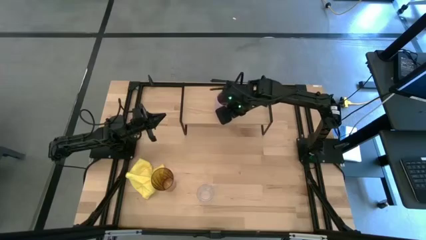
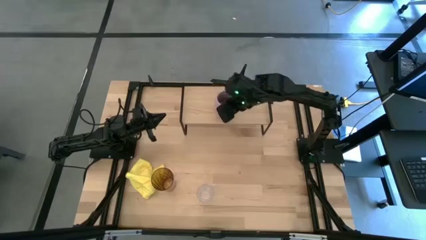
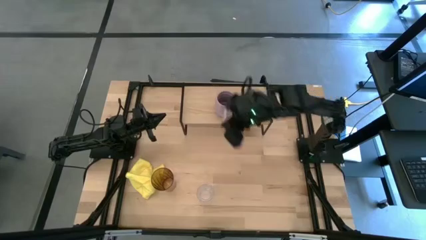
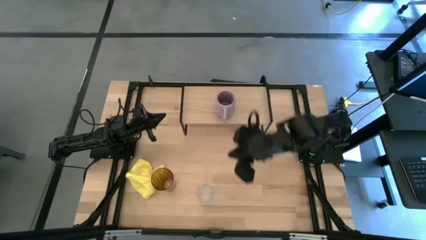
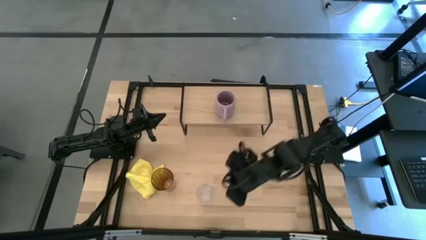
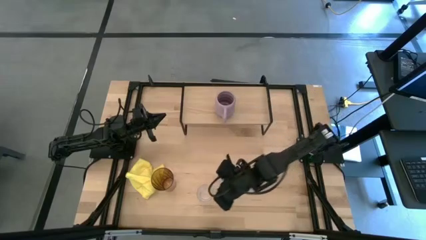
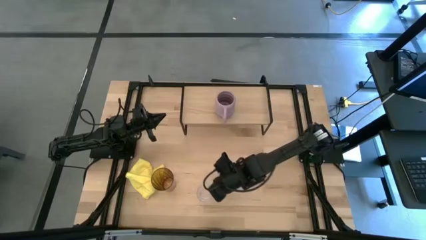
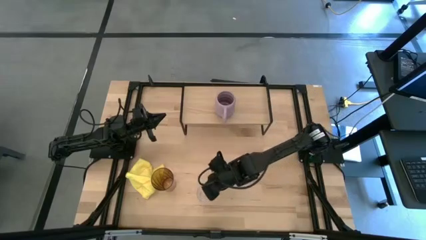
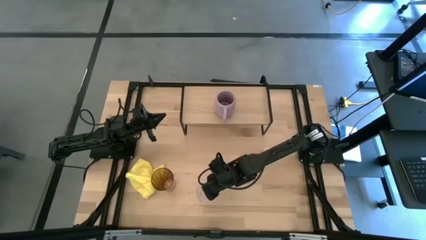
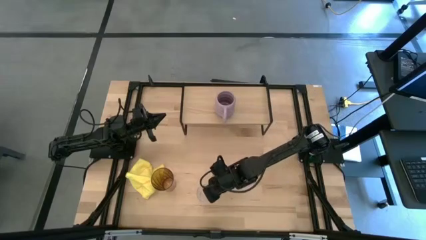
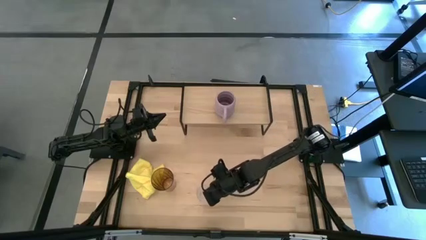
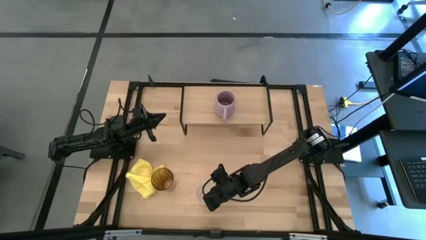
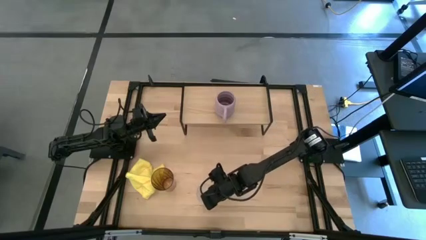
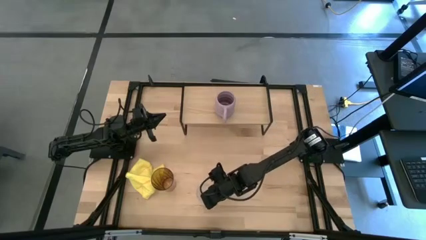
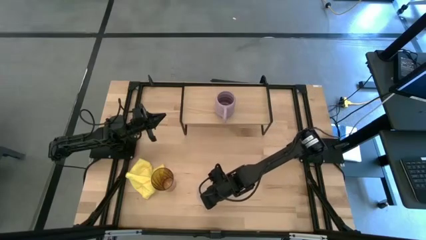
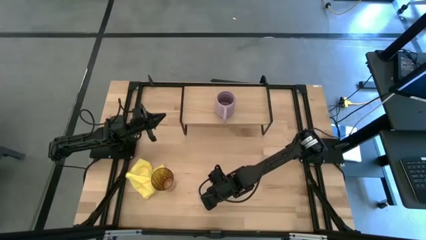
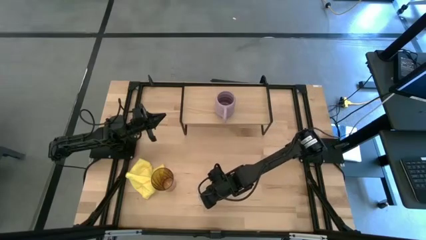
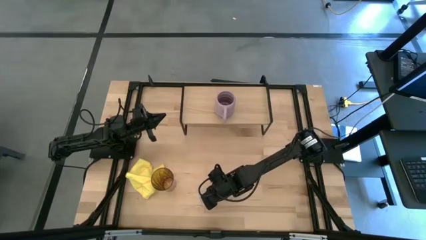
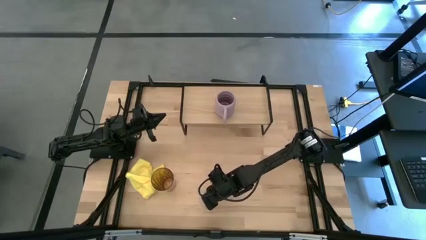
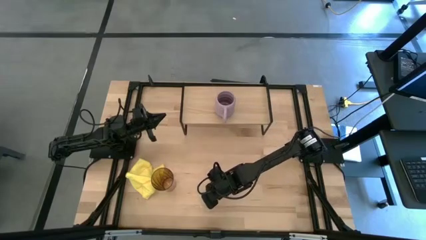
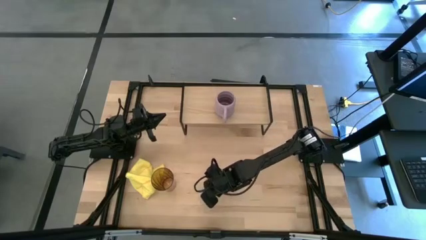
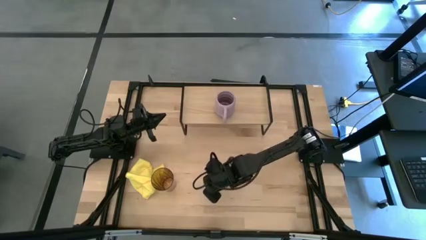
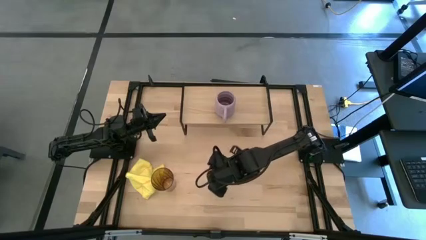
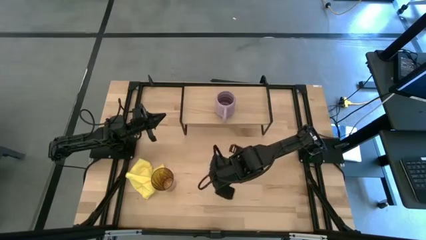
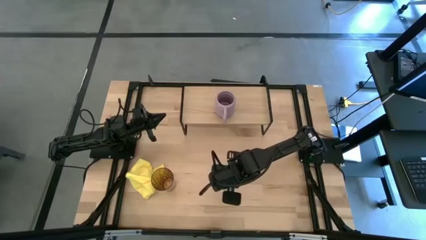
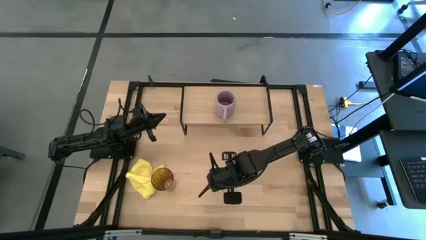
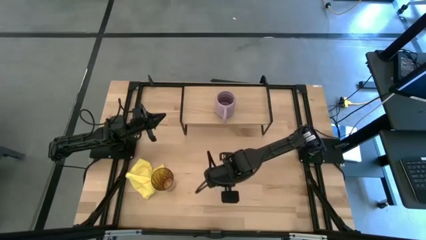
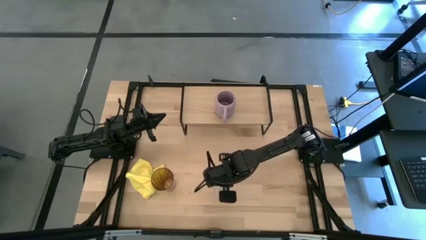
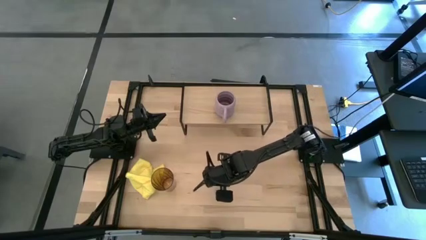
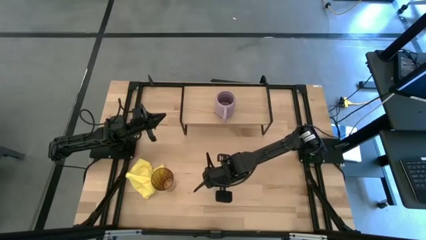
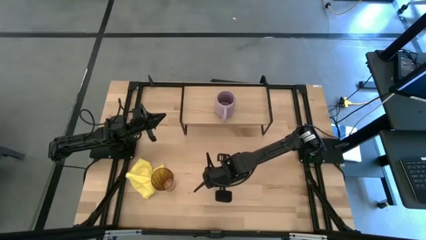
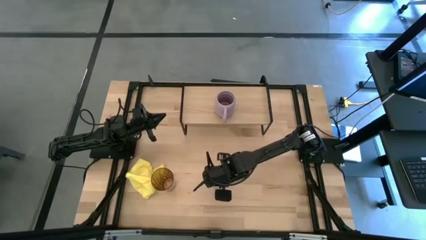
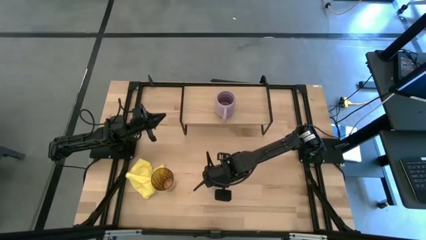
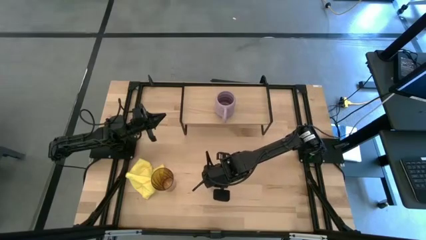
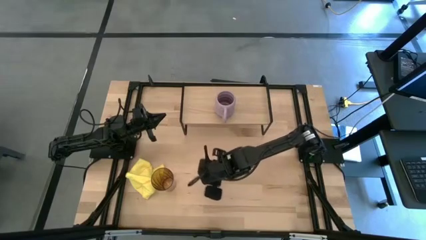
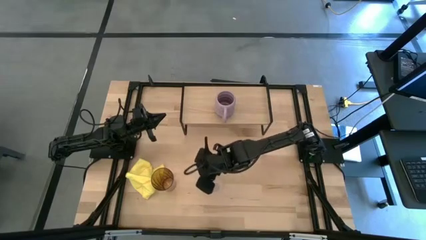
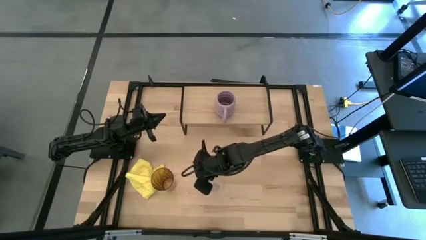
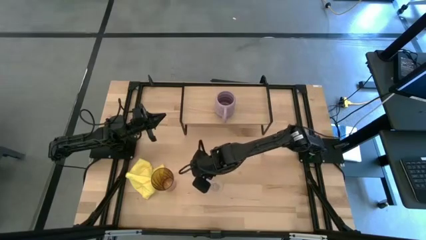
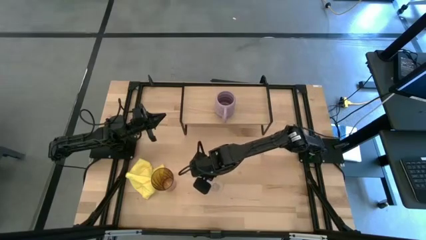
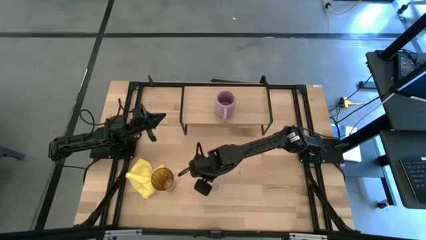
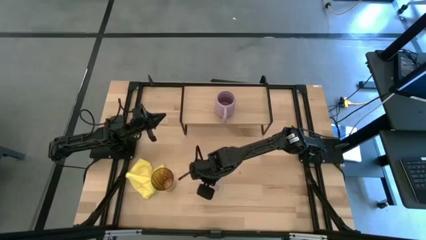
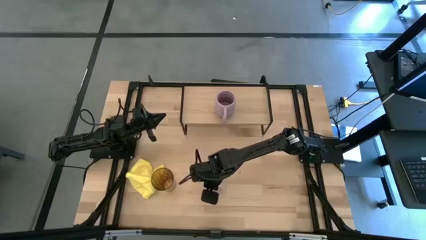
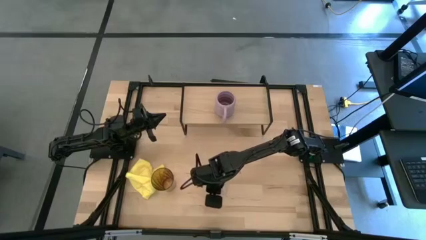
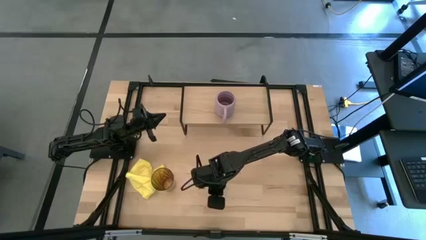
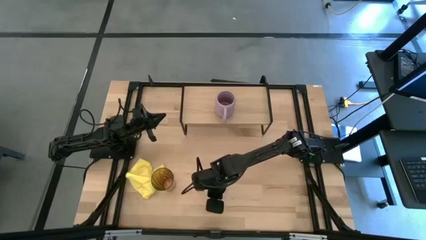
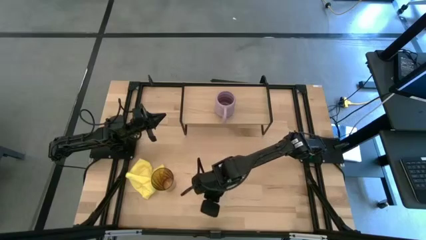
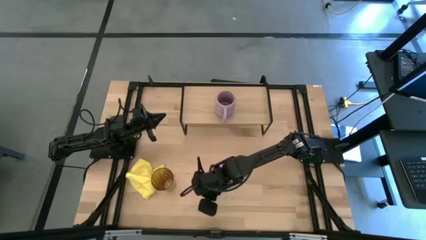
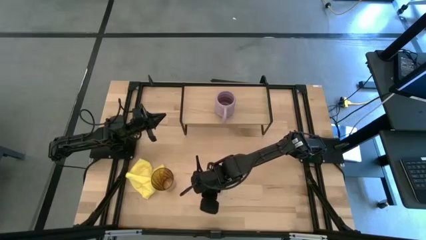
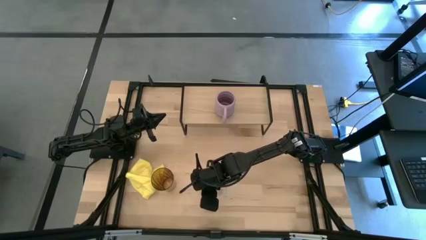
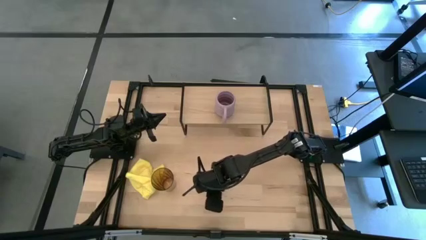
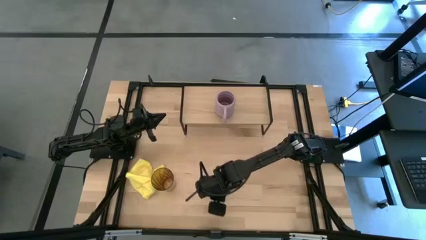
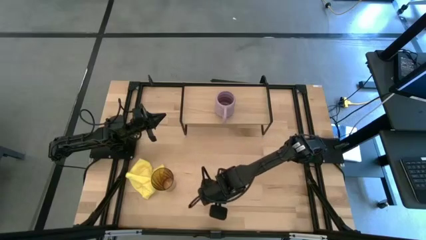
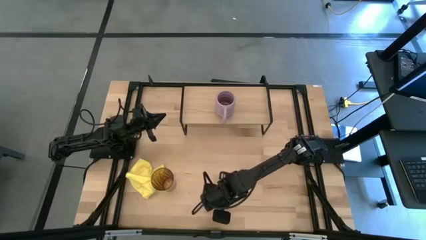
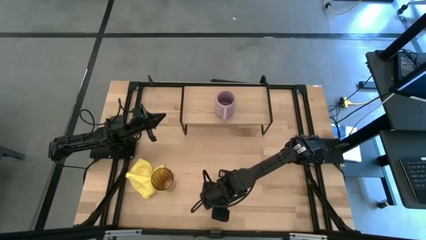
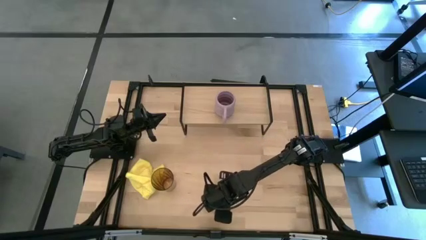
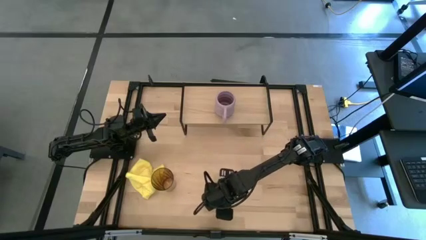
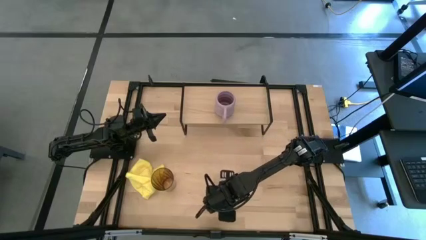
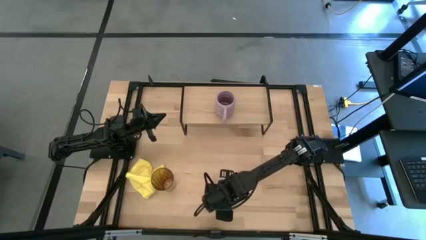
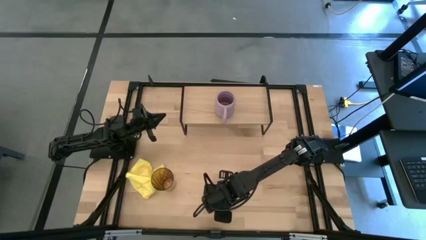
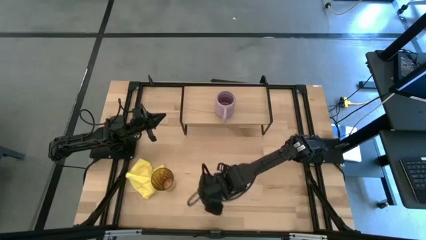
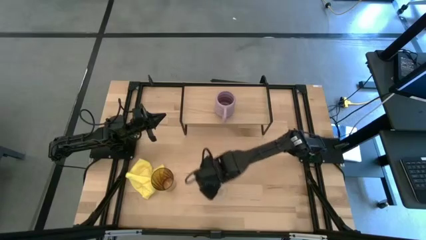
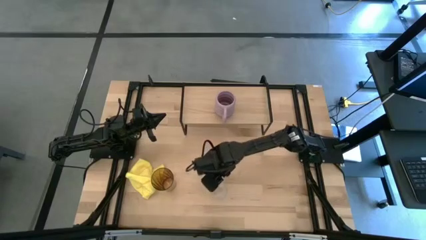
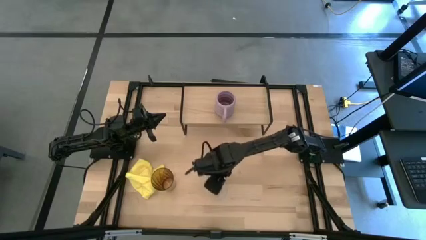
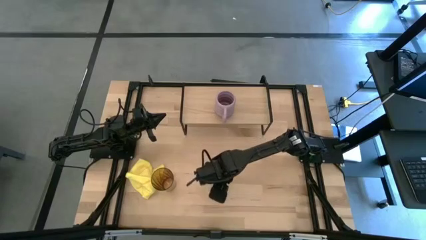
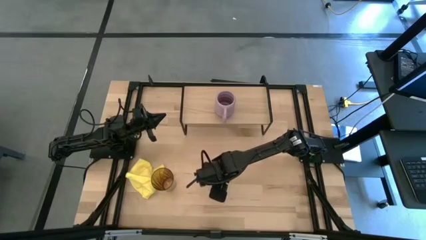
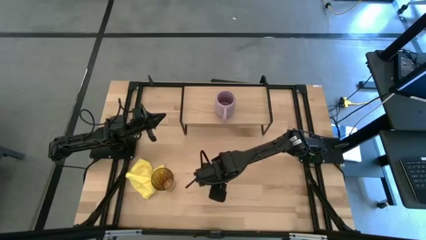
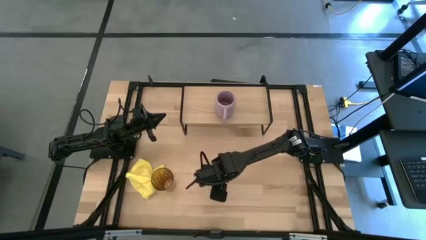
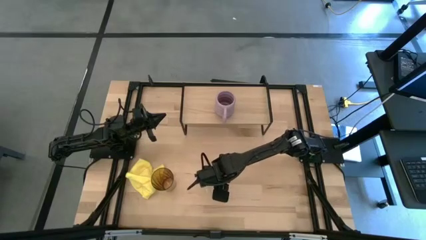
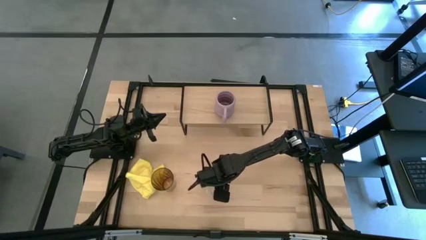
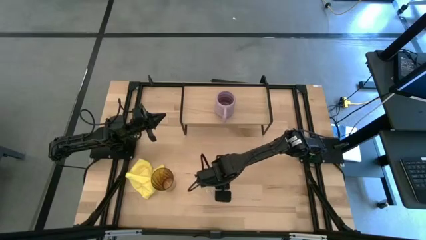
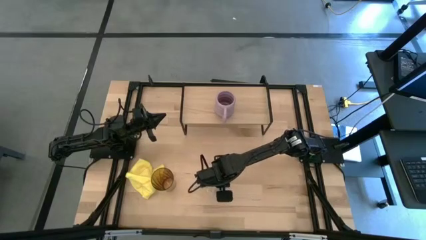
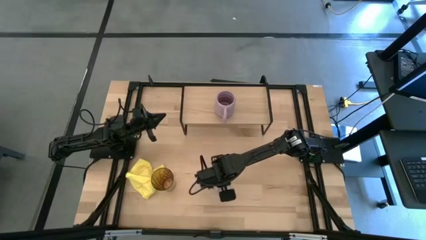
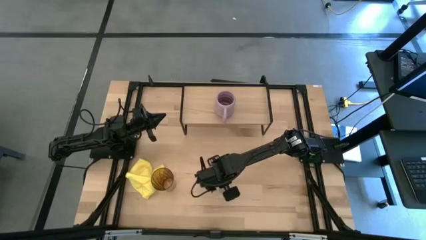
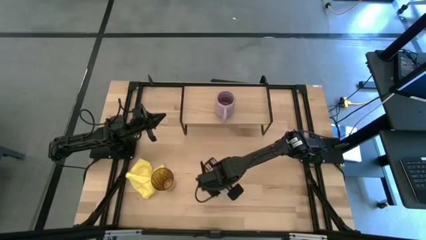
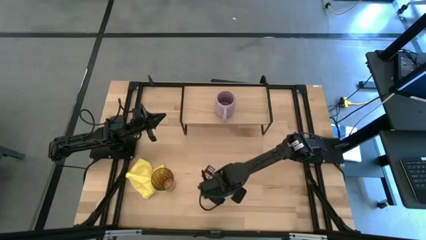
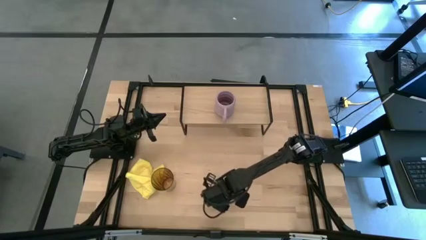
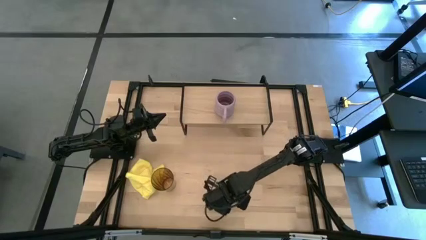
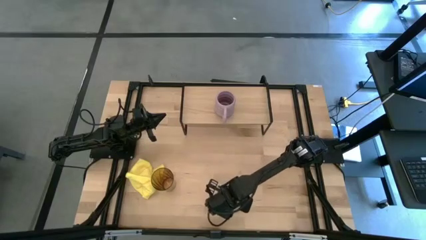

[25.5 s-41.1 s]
Task: Stack small to large cups/mugs on shelf
Put the transparent mug on the shelf
